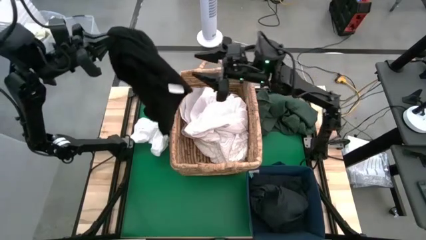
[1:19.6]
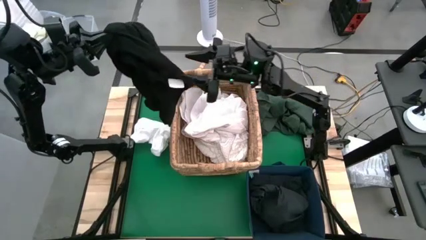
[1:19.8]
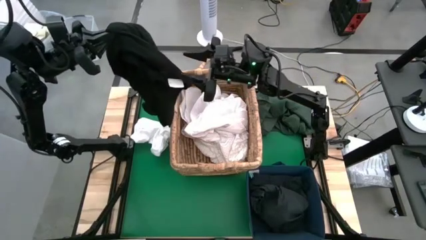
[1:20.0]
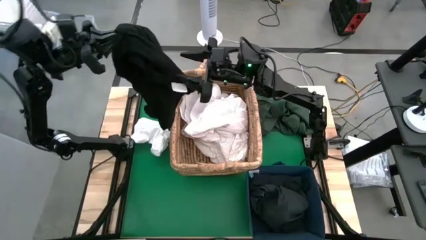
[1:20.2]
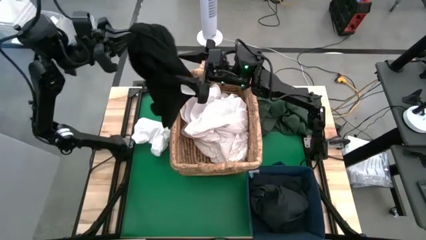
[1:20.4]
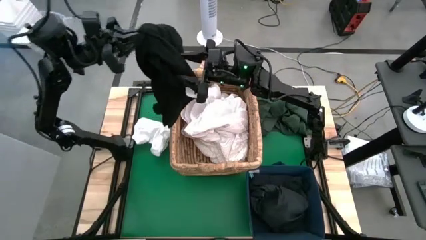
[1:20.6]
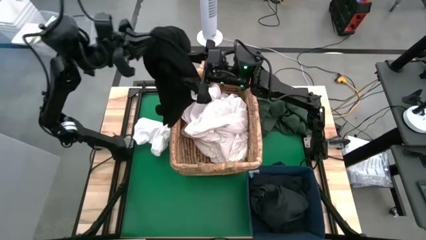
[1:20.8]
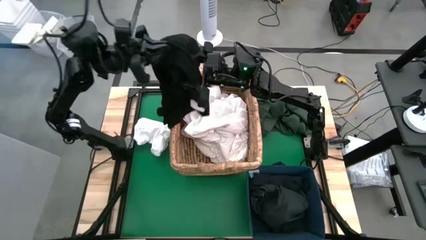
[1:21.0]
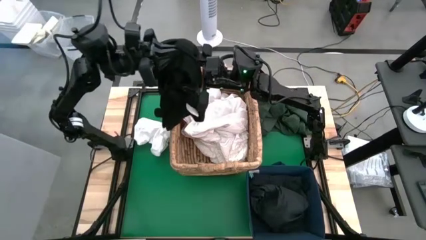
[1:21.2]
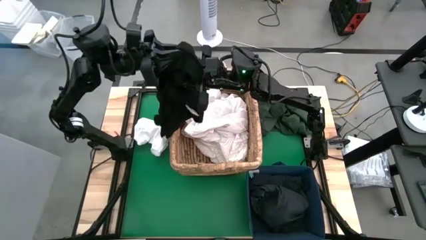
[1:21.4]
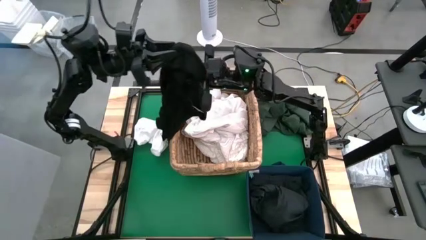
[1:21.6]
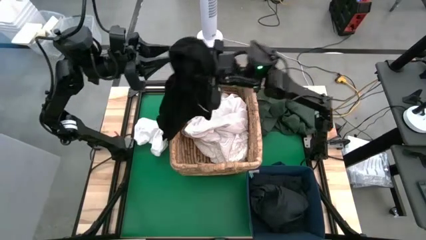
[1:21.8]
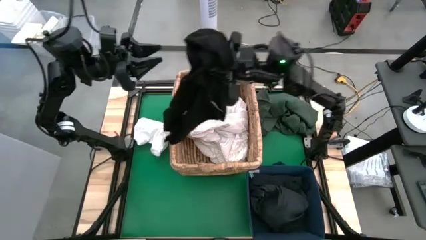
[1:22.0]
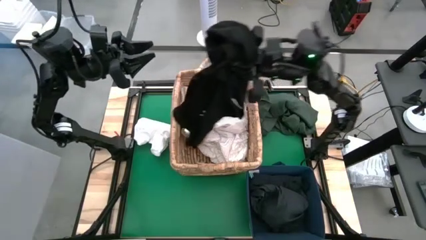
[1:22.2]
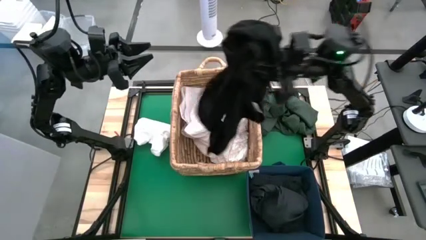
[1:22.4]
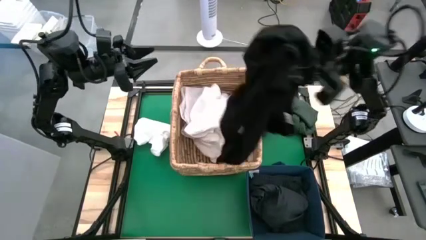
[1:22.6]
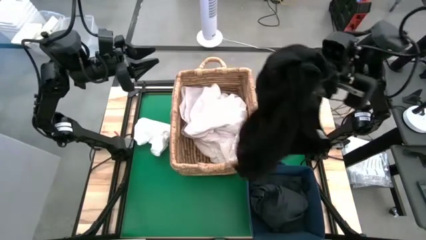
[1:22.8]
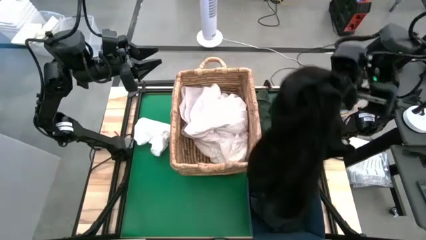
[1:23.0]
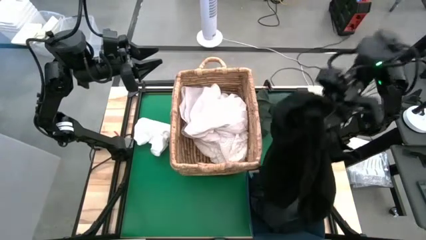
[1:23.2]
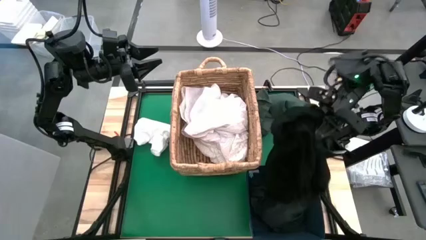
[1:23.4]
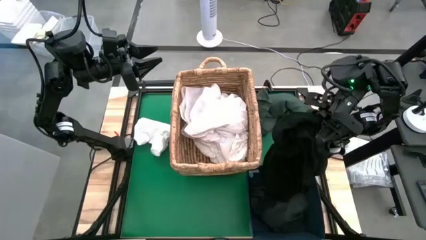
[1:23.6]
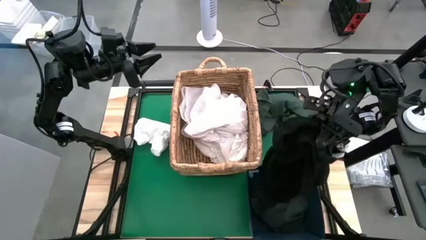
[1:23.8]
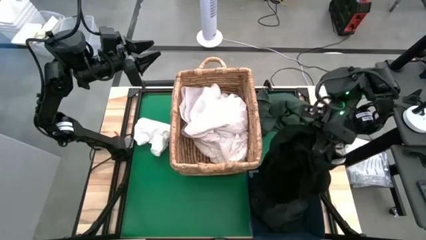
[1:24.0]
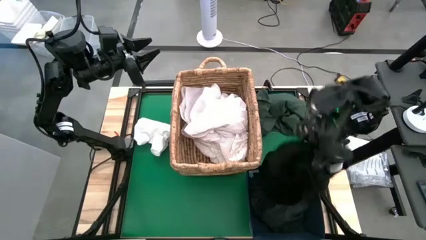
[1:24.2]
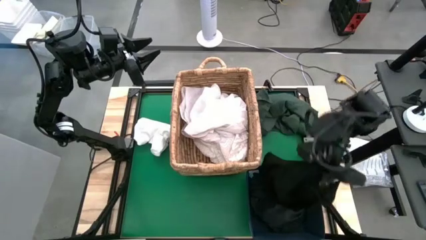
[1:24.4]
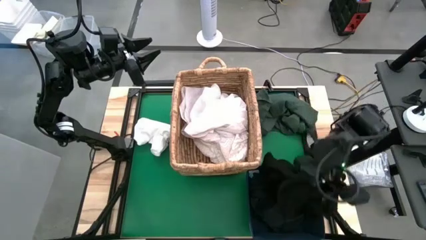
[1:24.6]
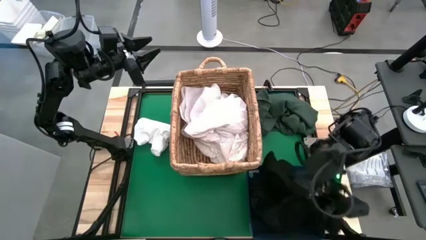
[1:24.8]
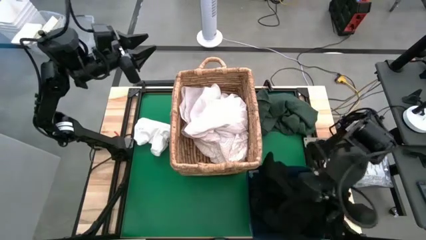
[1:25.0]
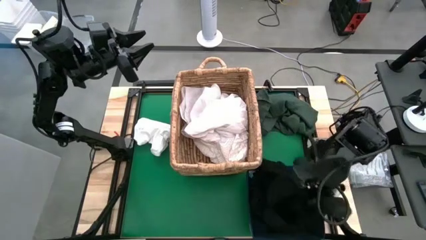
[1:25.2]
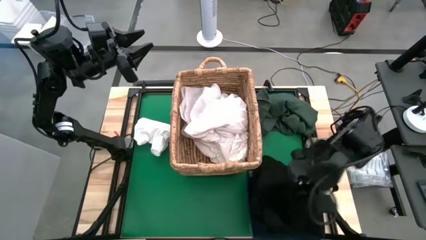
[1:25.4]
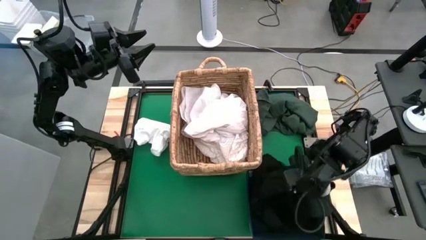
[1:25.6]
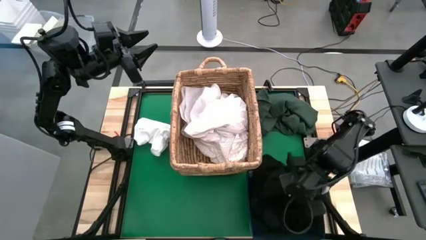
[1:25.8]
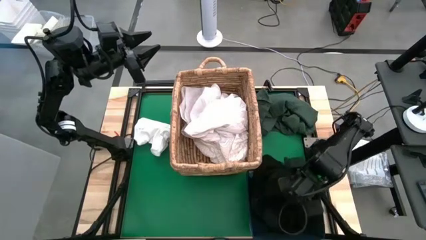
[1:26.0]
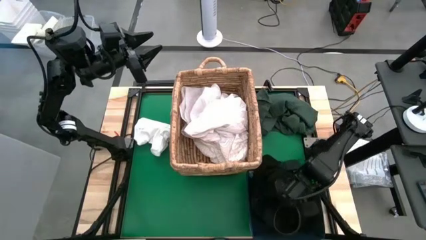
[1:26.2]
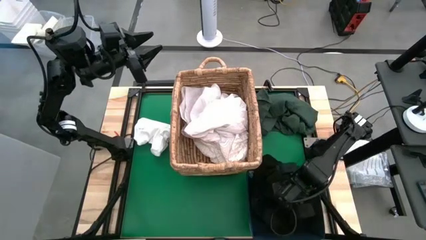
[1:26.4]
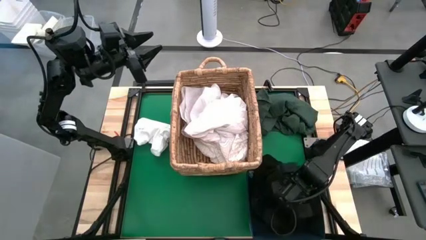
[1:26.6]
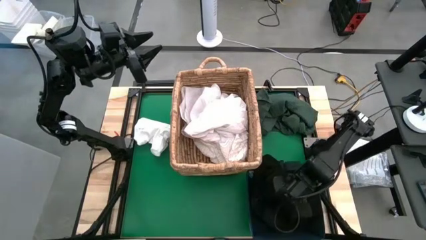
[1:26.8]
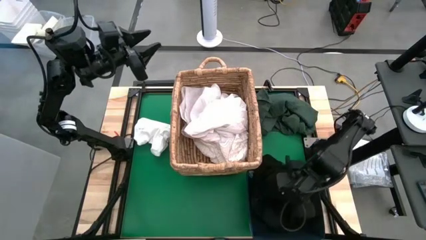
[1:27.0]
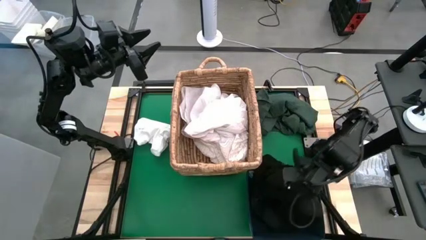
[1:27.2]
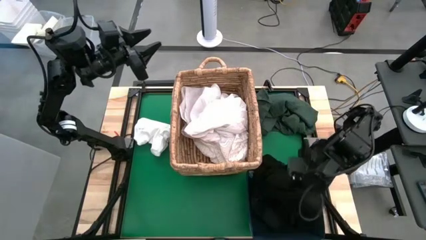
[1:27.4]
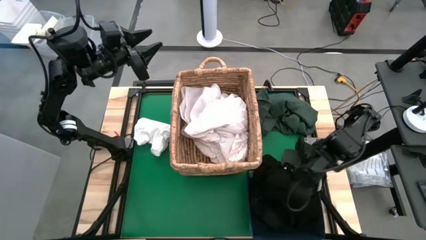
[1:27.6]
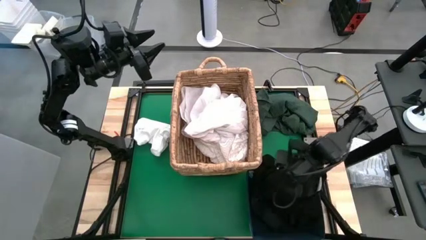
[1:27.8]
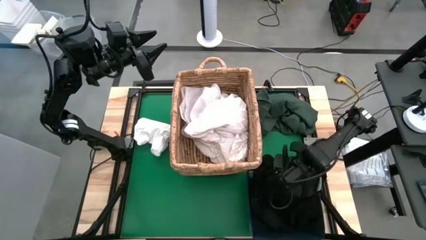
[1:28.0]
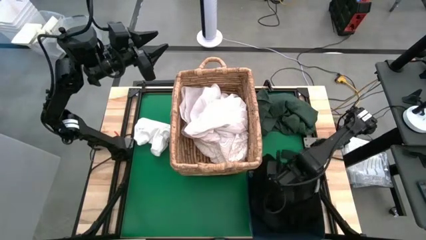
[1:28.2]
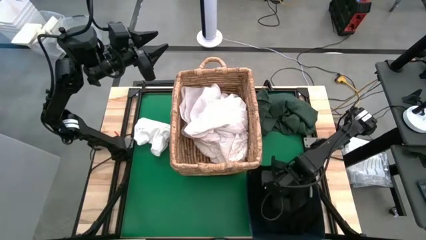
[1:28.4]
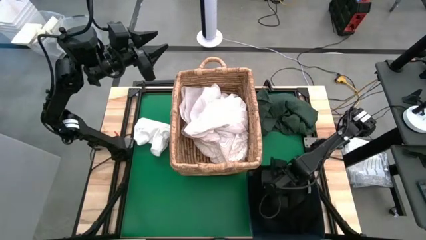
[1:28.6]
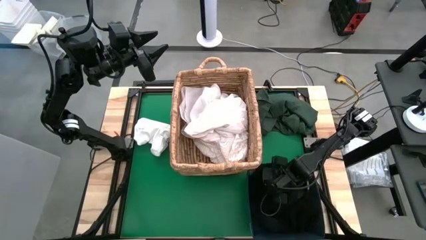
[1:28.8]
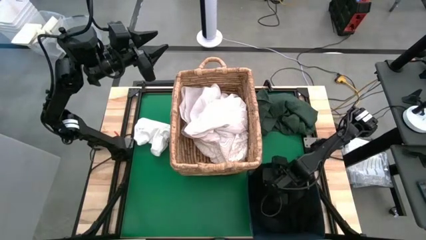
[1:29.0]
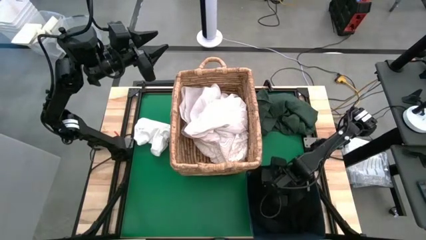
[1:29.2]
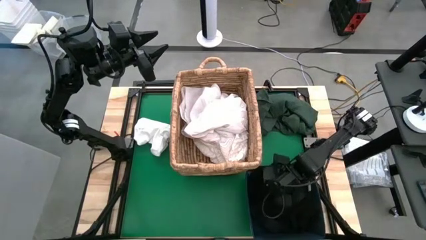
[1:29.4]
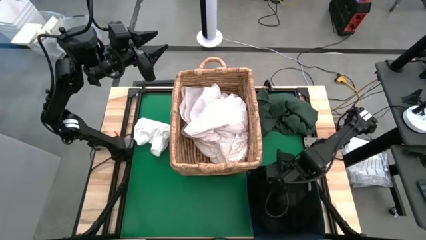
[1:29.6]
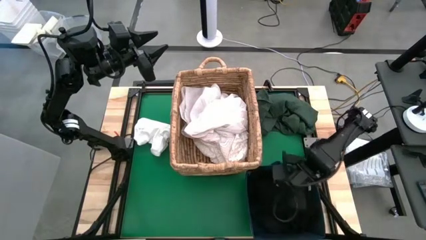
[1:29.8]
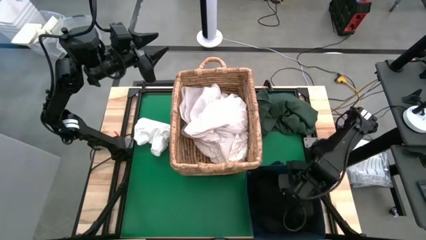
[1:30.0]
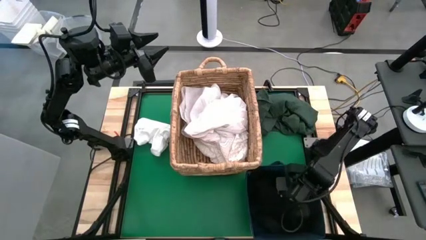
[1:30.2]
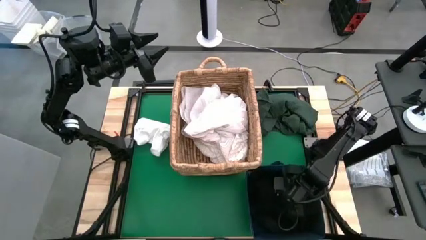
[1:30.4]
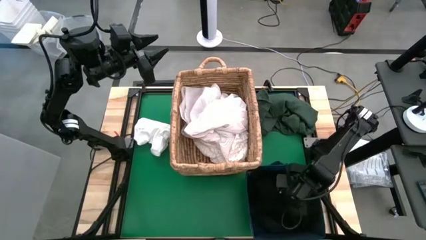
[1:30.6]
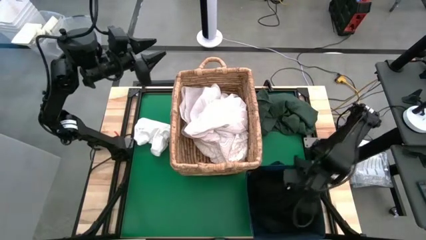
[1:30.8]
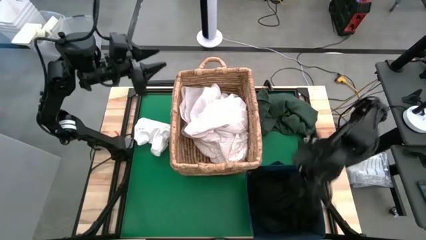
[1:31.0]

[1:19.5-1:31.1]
Put the black sweater into the laundry organizer

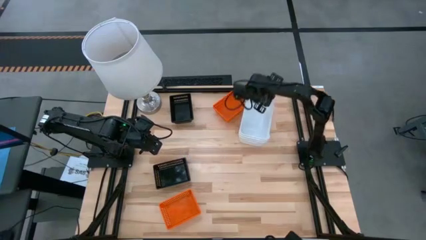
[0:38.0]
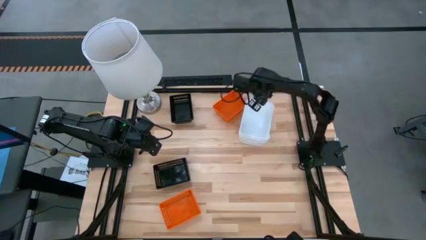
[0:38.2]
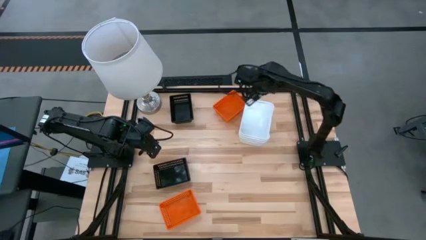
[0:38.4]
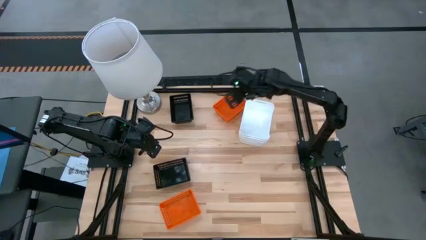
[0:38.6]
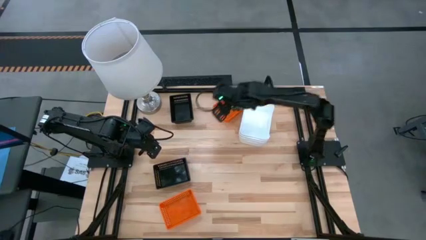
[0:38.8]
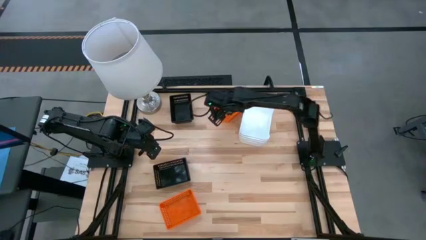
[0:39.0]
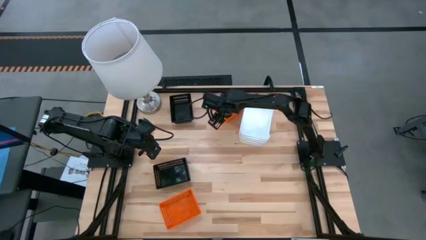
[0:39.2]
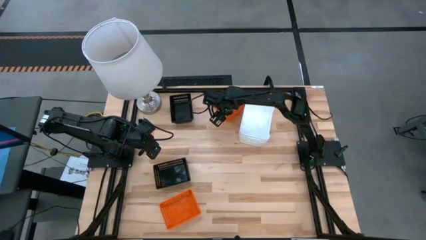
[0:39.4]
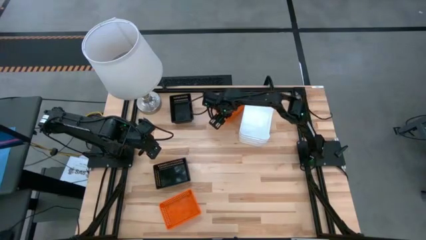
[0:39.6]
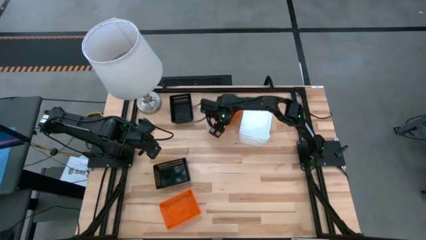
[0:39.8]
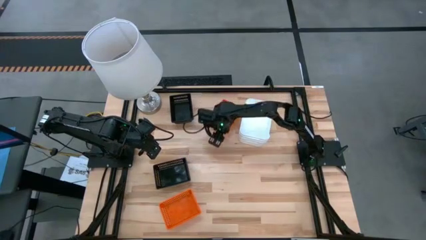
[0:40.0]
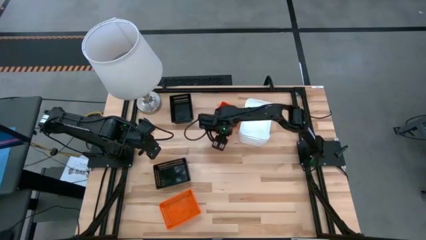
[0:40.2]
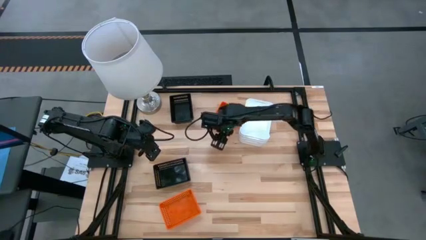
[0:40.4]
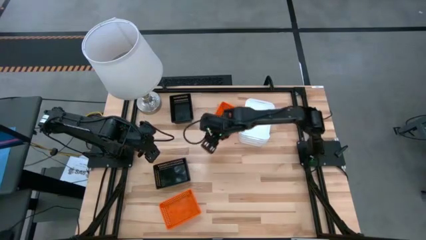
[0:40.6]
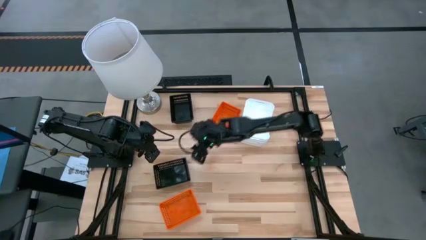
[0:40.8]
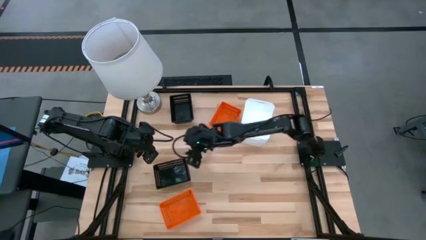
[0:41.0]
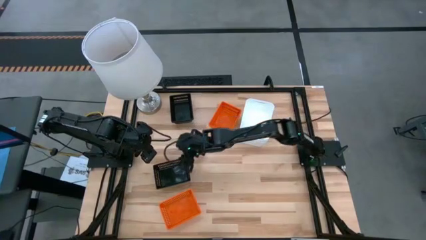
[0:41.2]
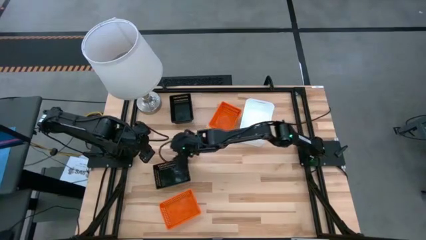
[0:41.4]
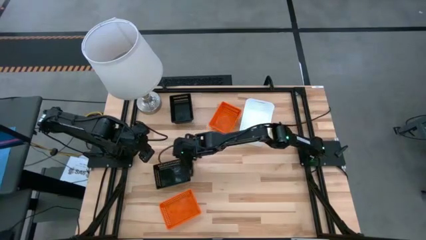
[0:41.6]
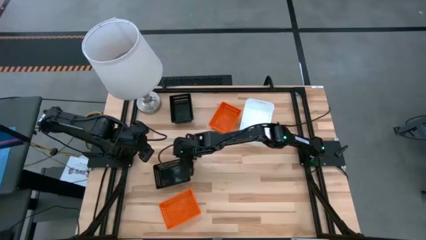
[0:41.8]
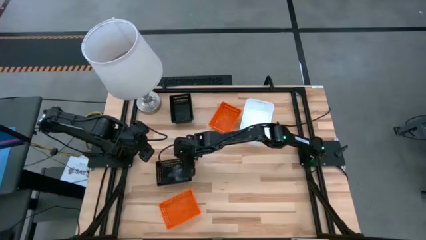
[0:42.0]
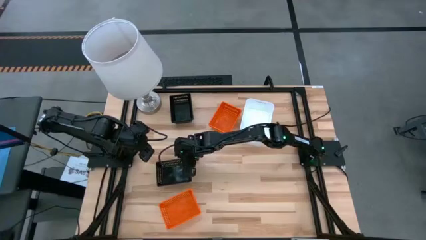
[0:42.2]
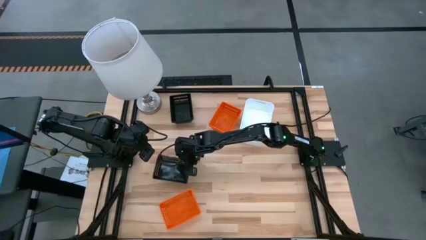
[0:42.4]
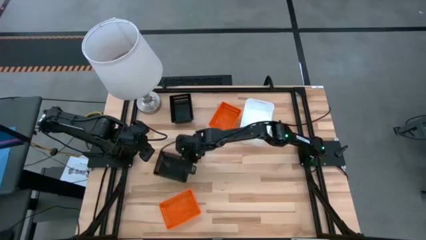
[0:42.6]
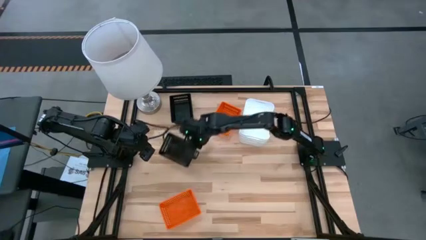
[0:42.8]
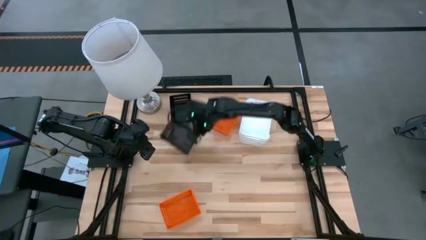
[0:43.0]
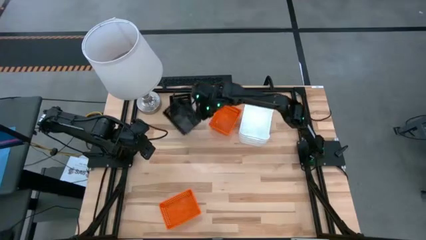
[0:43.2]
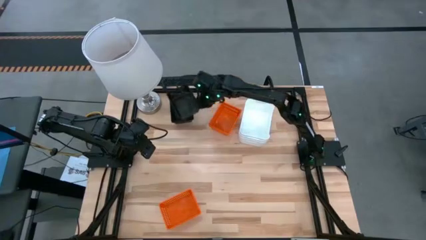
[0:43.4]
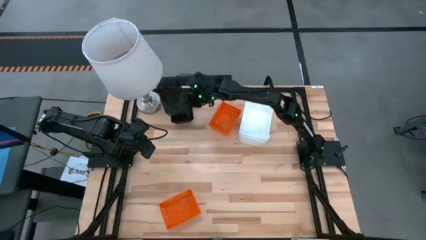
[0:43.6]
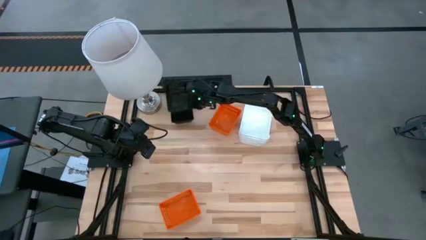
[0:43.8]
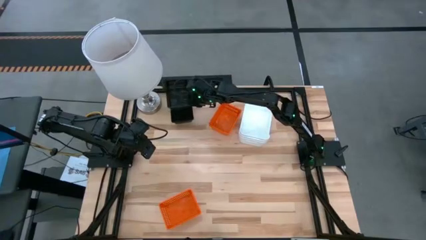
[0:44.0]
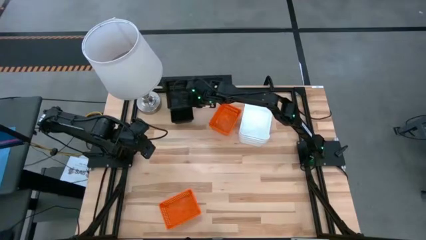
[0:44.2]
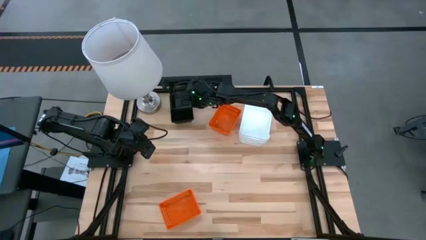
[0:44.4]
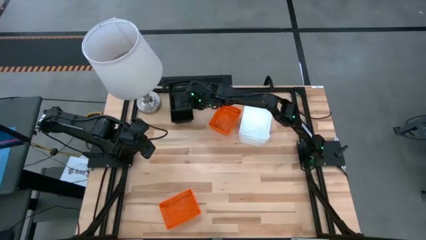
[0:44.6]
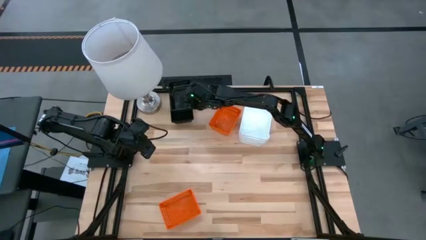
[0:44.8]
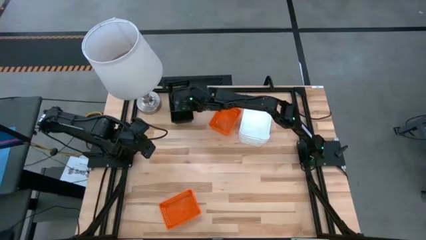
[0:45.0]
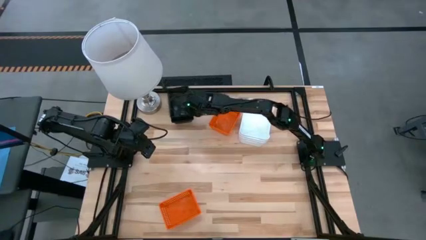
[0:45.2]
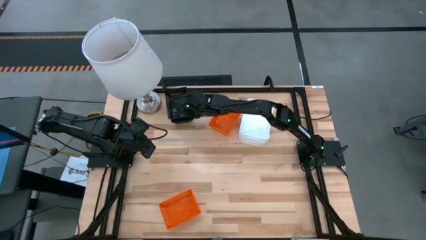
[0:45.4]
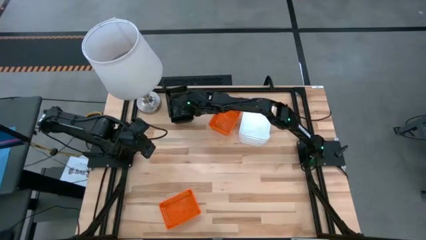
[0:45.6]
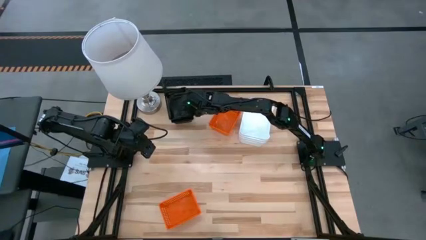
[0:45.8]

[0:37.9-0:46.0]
Stack the black basket on top of the stacked black bin
